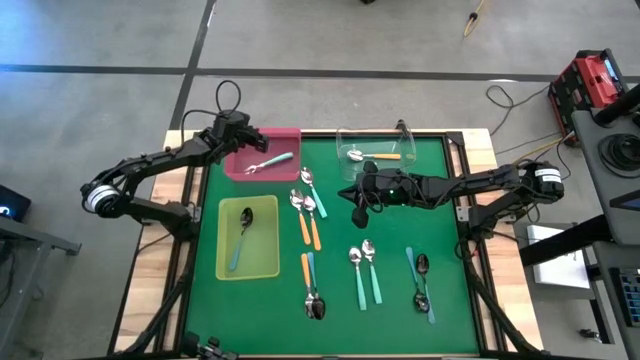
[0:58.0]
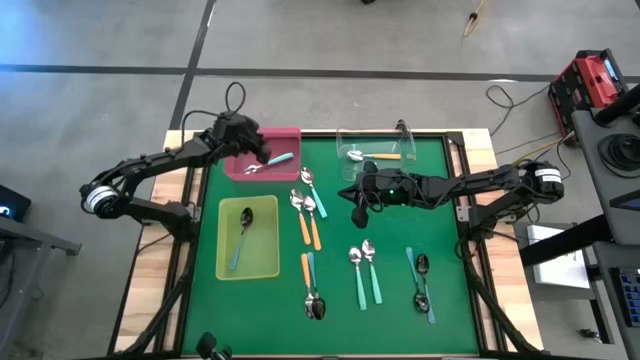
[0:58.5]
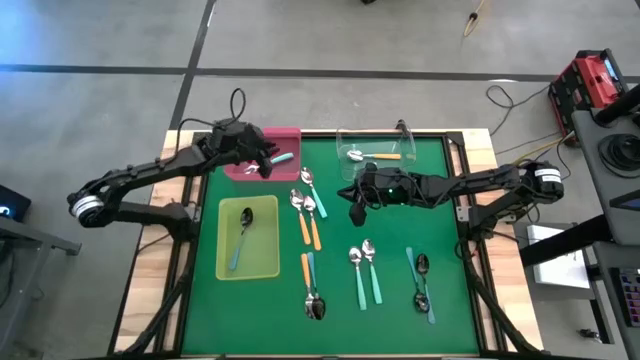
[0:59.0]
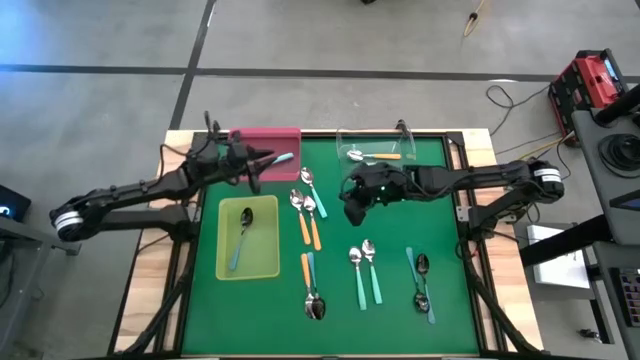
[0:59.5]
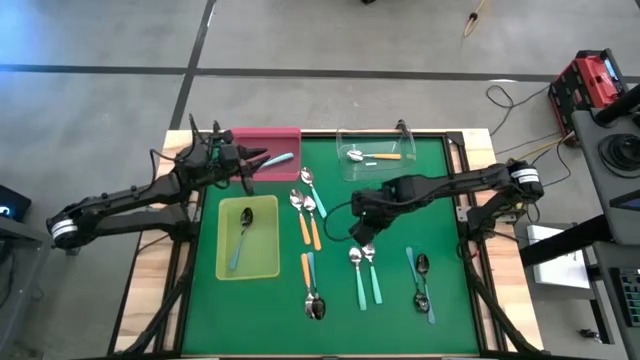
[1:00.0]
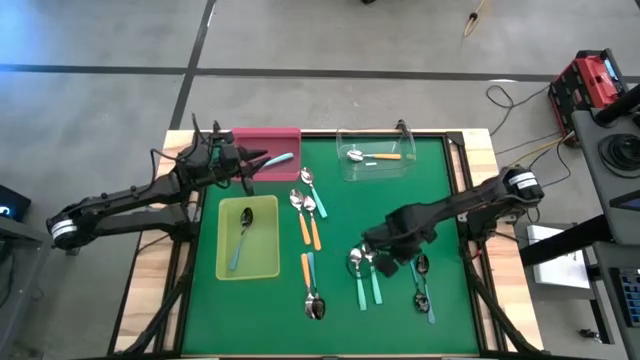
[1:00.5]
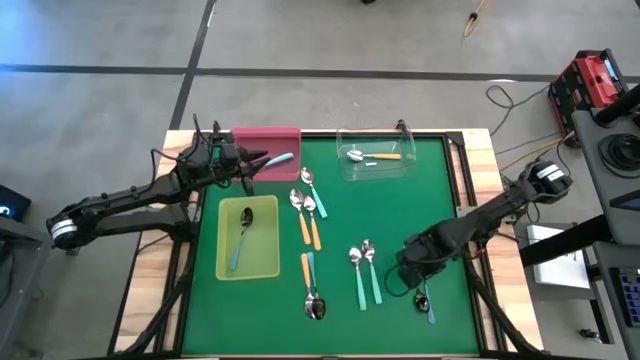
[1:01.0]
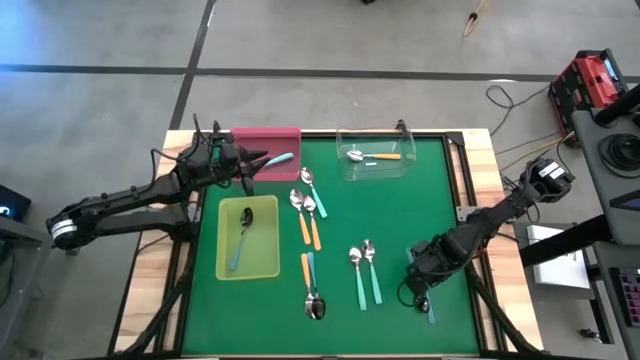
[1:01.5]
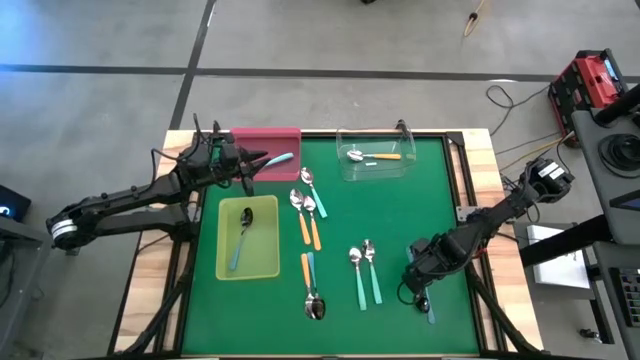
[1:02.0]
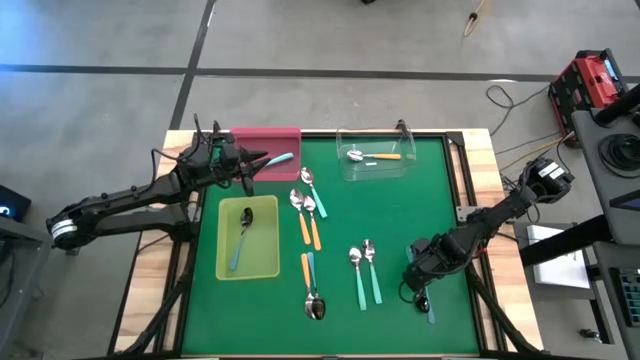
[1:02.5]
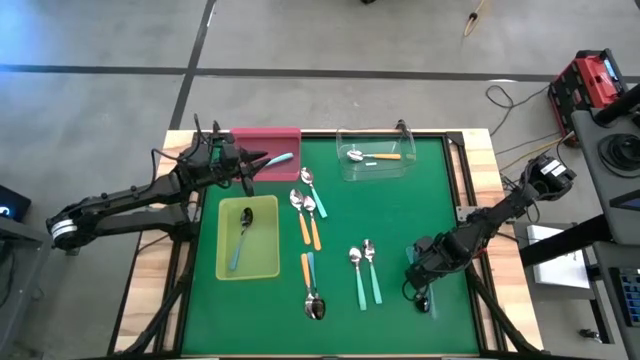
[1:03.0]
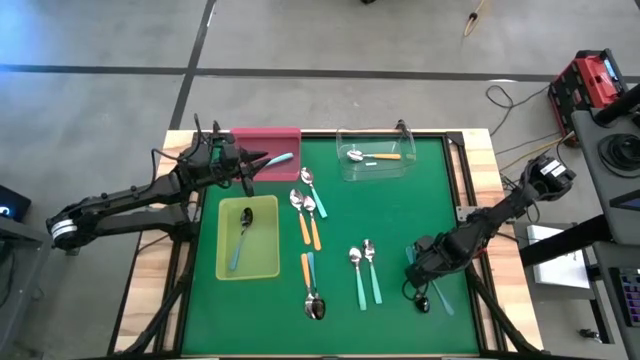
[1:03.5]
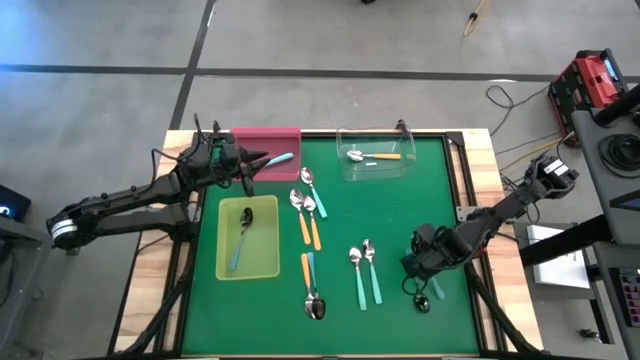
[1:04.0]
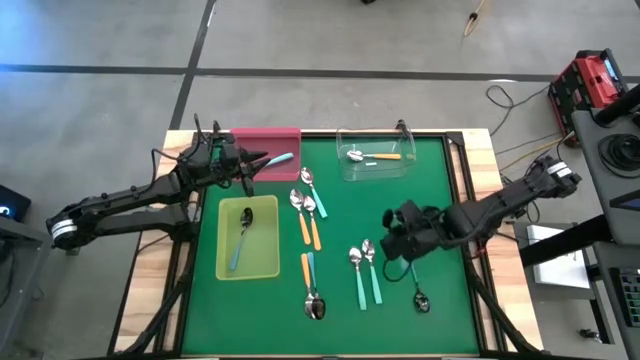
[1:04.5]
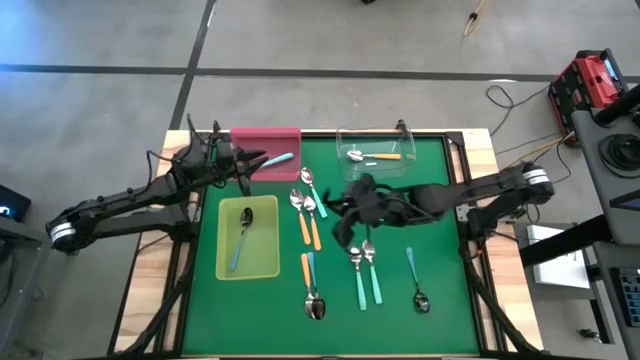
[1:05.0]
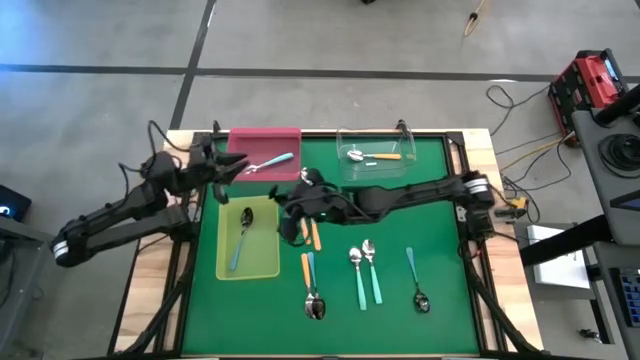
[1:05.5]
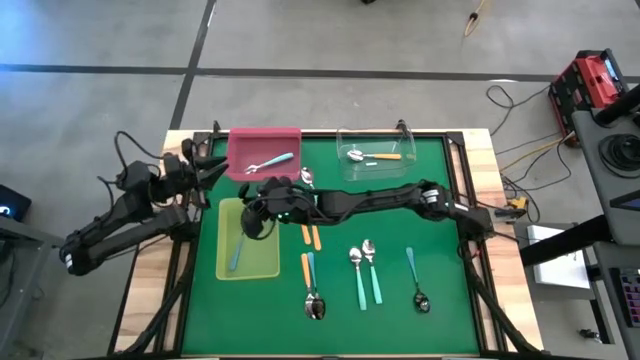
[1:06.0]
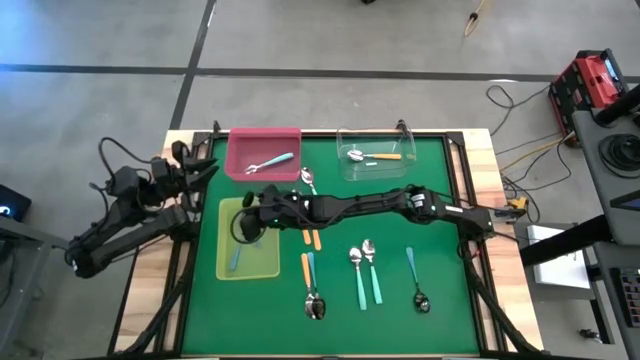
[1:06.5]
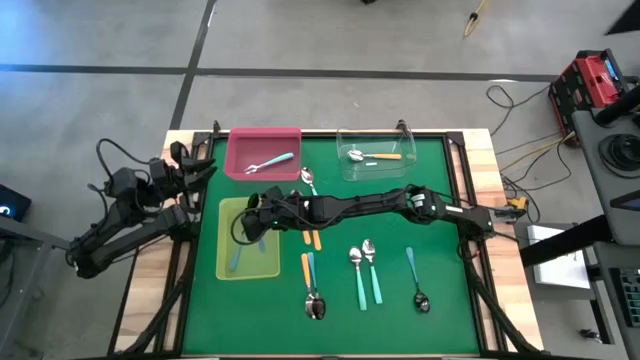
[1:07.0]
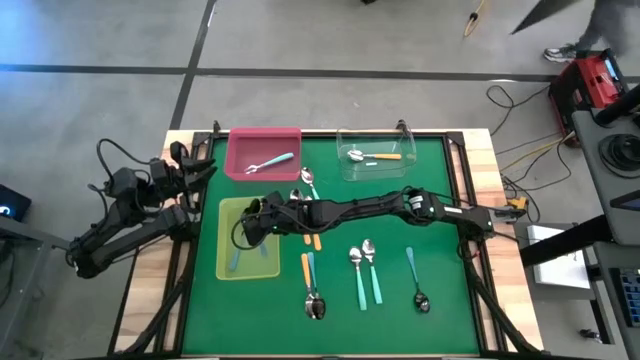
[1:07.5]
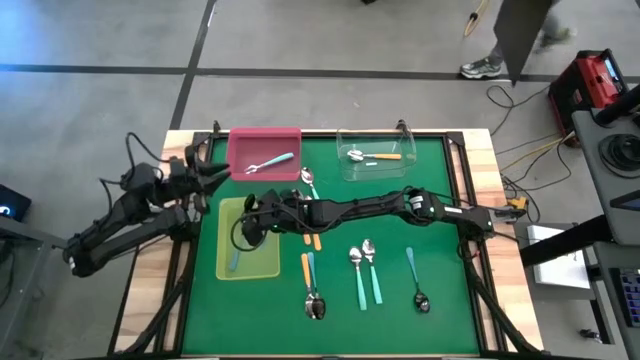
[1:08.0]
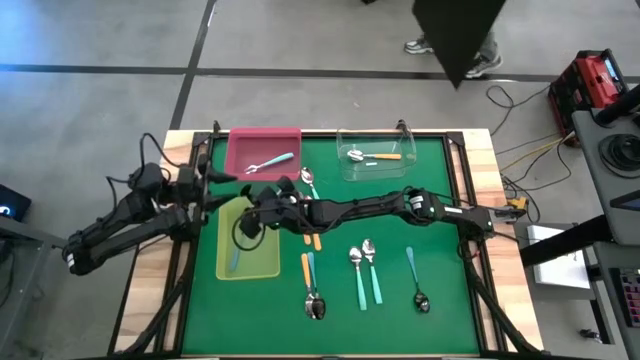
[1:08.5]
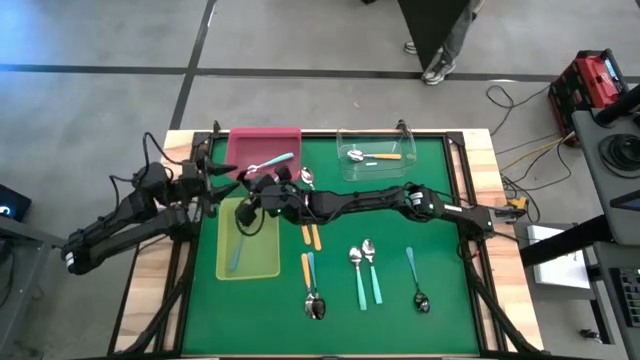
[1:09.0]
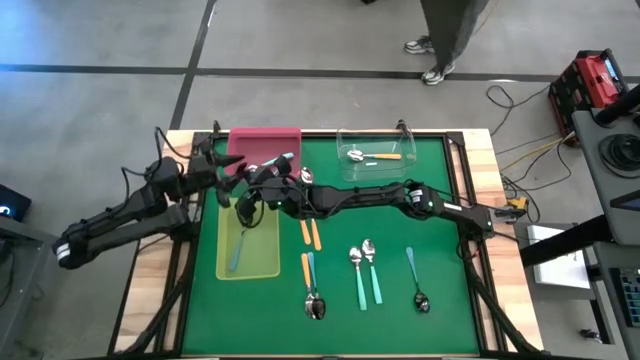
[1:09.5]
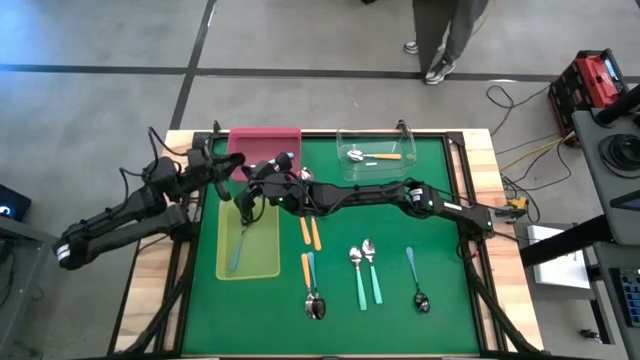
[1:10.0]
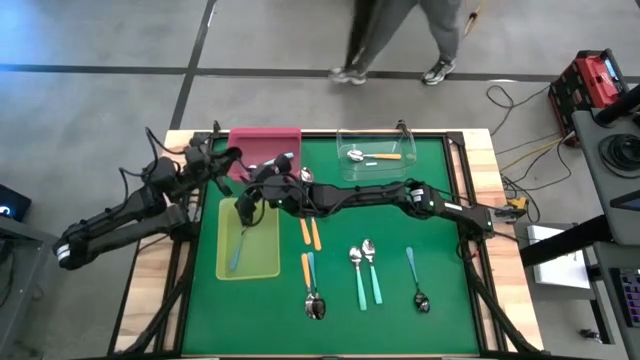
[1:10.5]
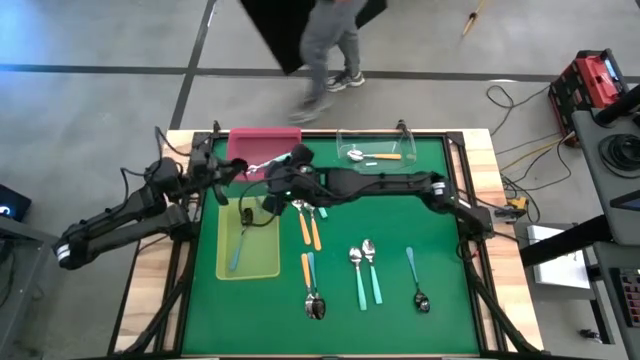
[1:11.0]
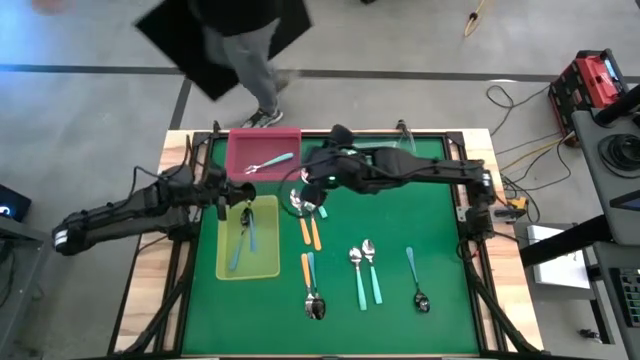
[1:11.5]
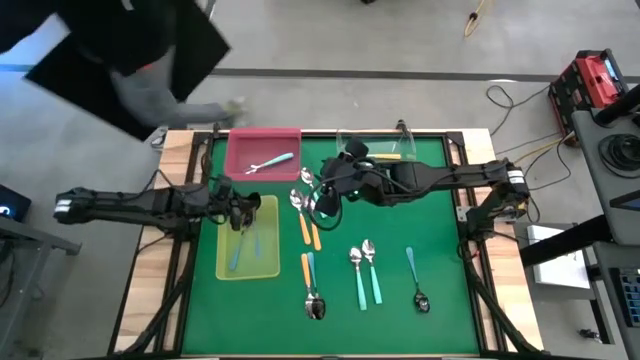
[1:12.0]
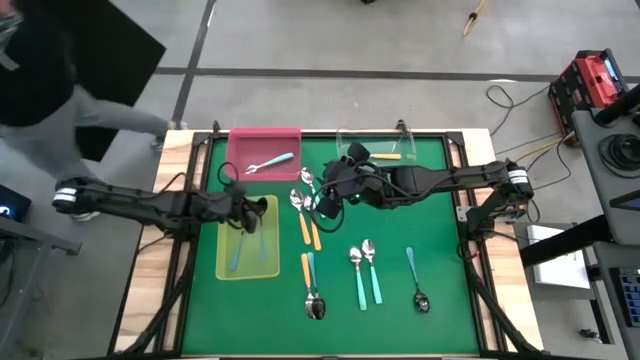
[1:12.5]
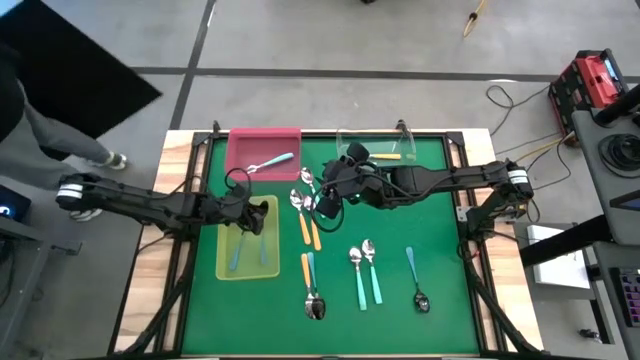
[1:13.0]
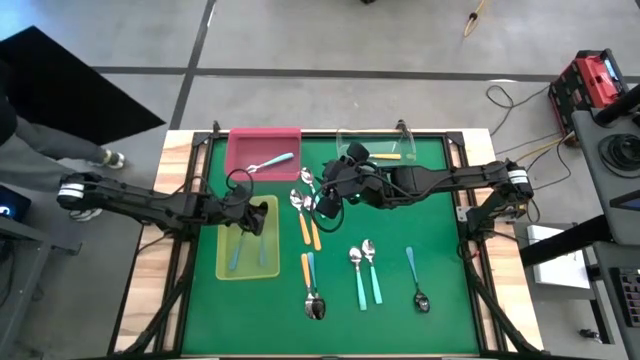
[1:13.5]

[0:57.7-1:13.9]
Task: Sort silverware by color (type)
Put the blue spoon into the yellow bin

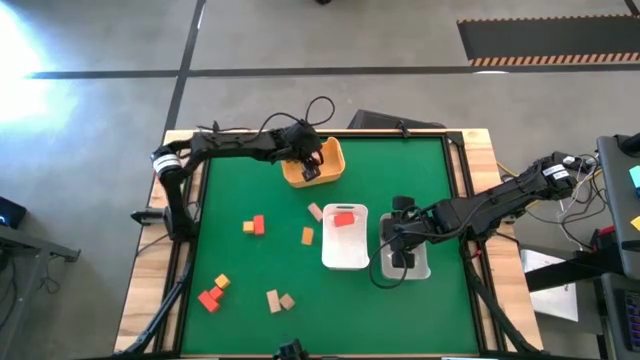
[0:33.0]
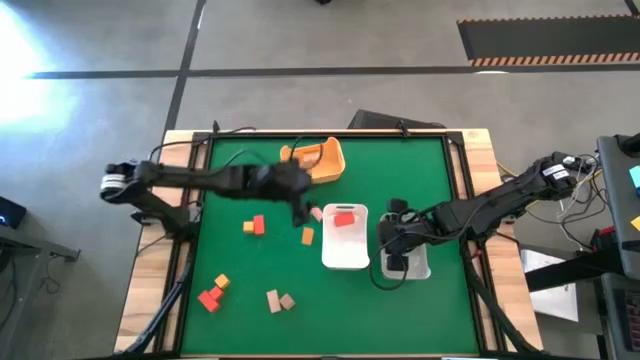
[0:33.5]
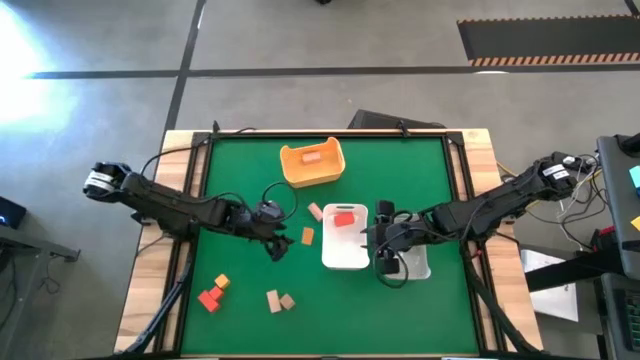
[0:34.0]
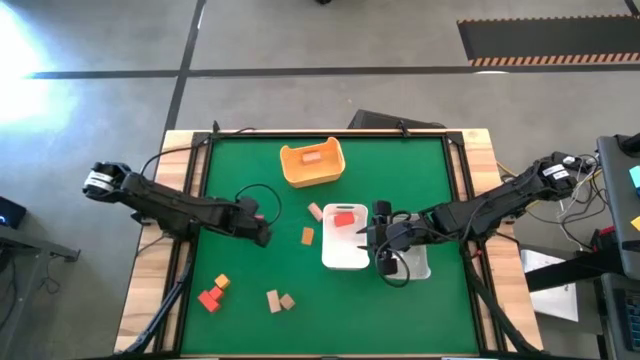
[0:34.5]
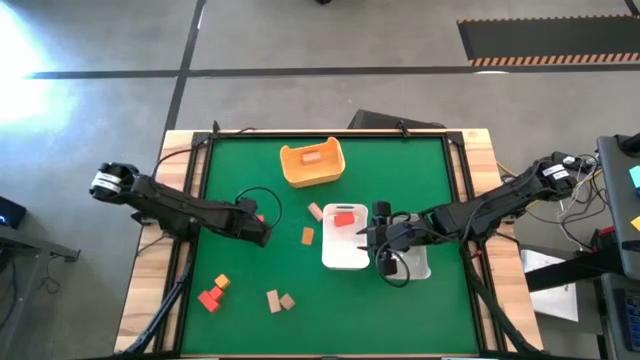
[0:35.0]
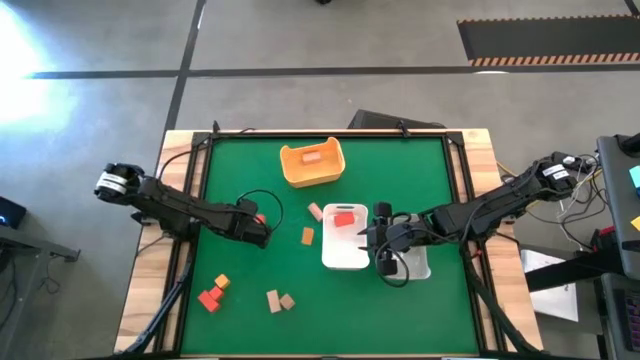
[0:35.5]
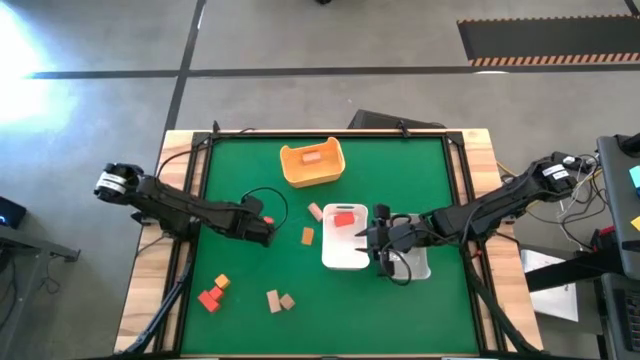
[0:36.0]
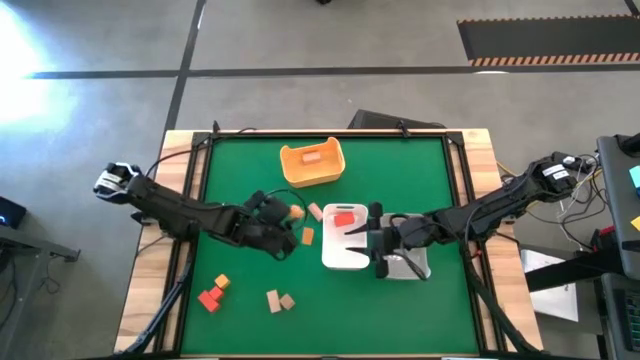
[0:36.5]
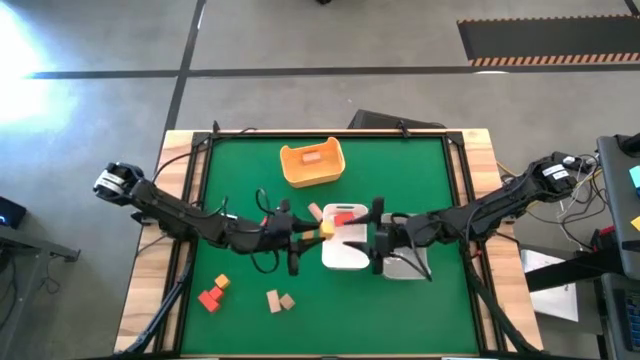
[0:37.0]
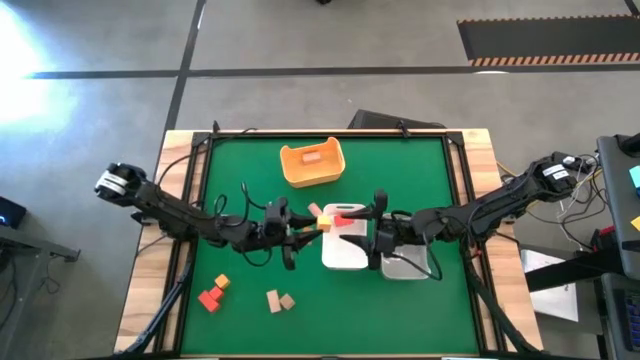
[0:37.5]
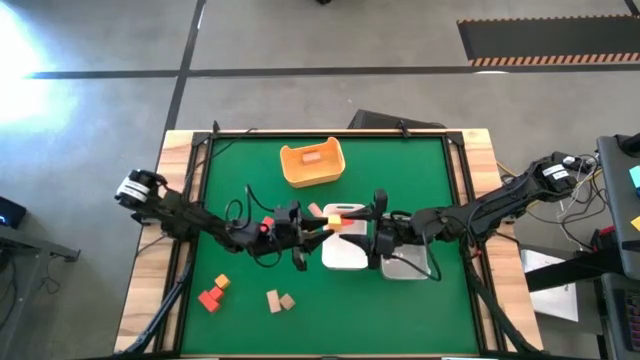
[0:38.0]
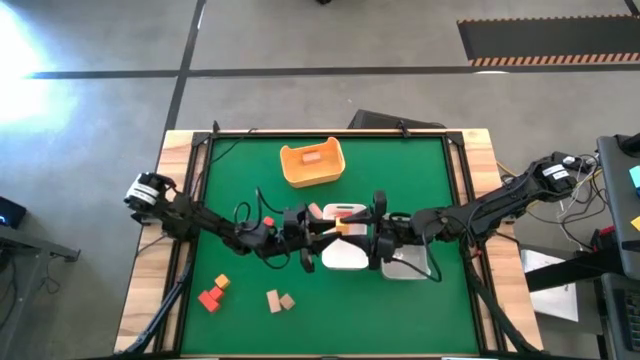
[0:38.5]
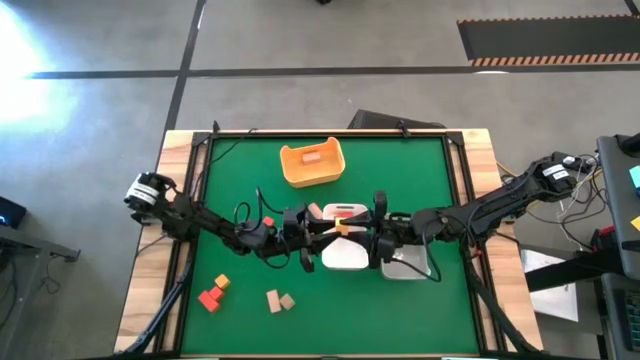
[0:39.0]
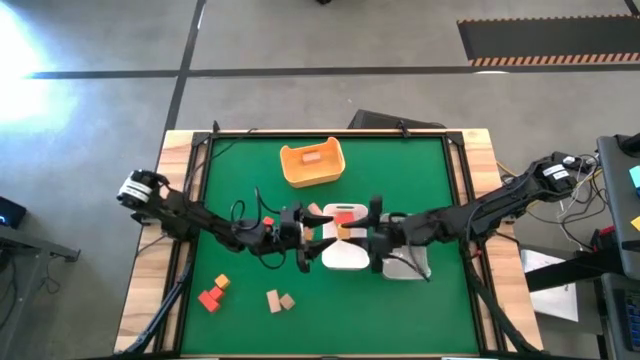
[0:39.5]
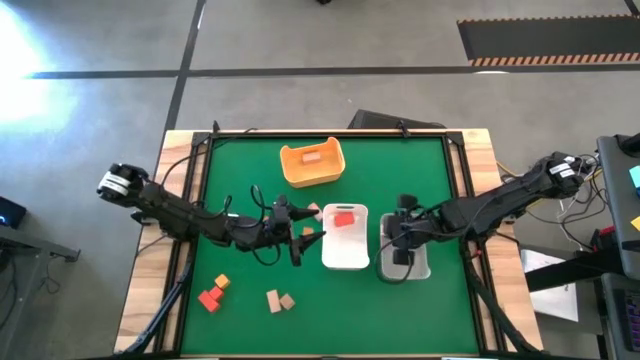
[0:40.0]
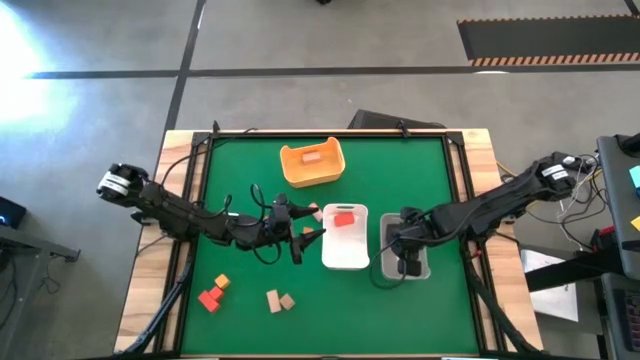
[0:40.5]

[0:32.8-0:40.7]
Task: Sort & place blocks by color
Put the yellow block into the gray bin
